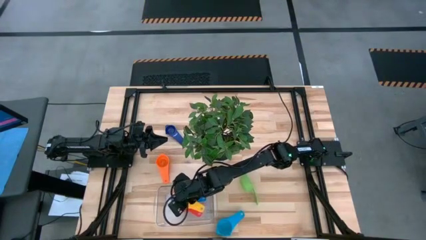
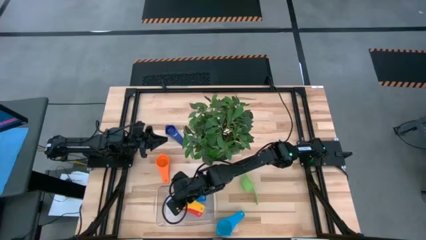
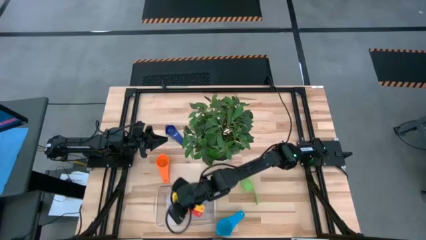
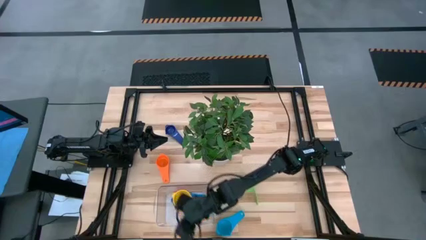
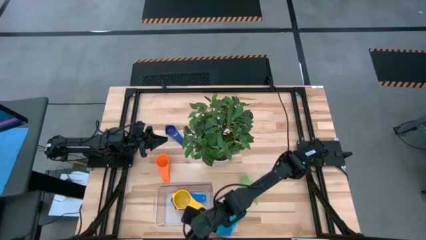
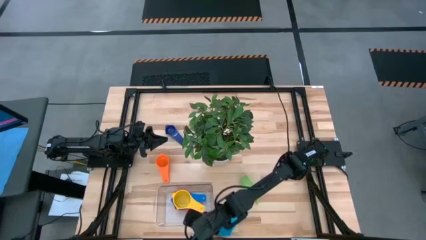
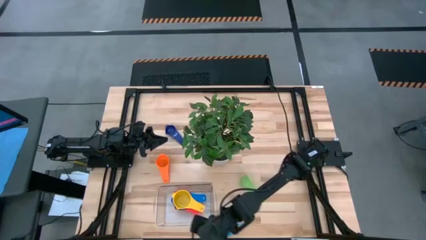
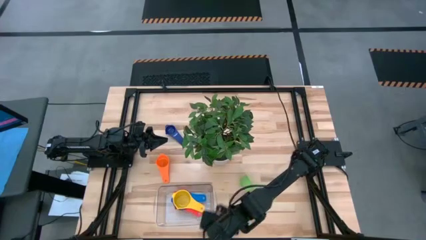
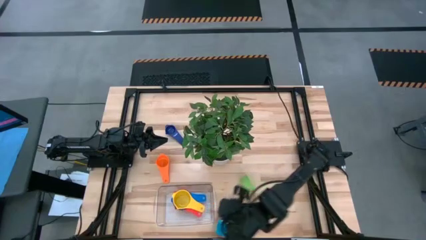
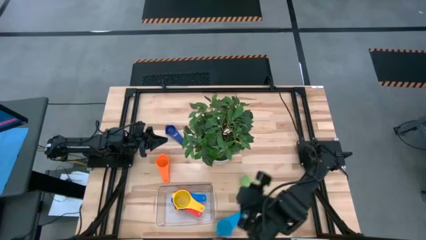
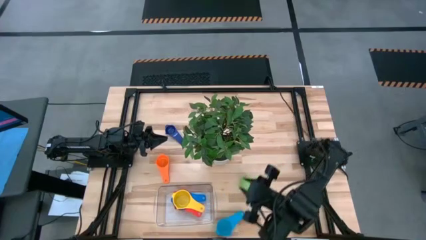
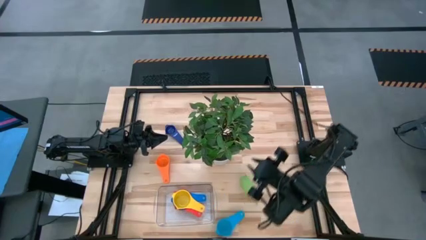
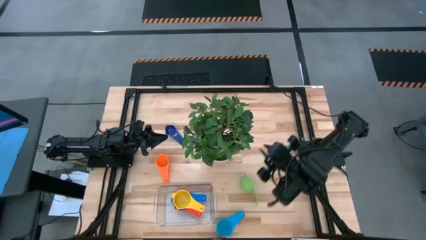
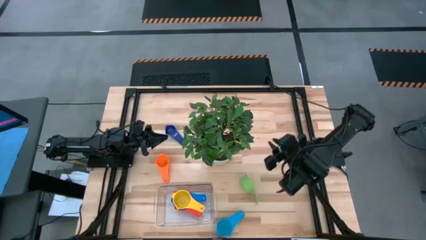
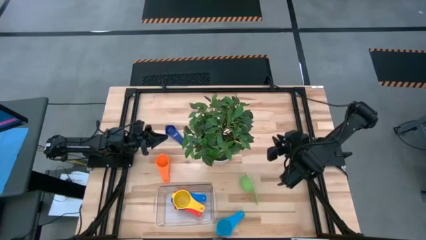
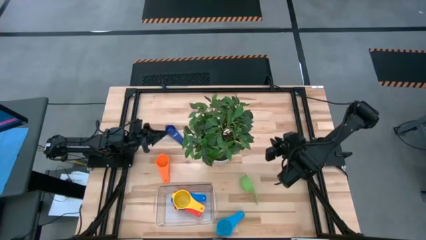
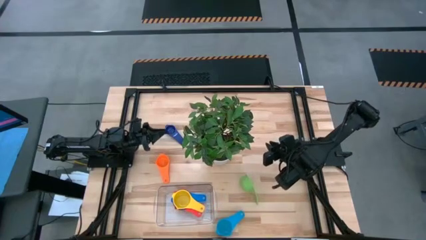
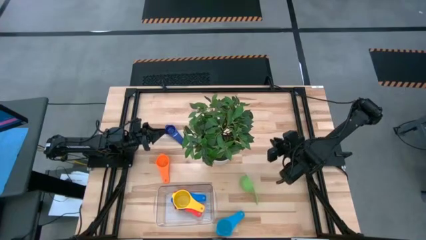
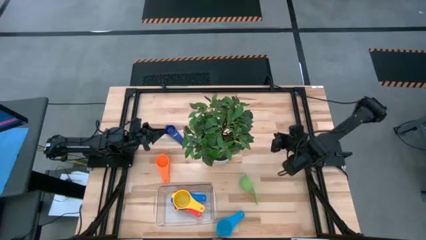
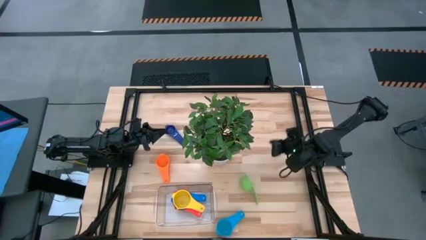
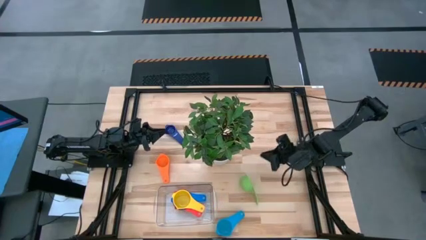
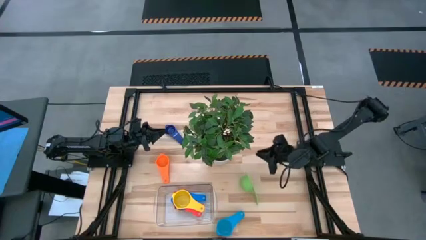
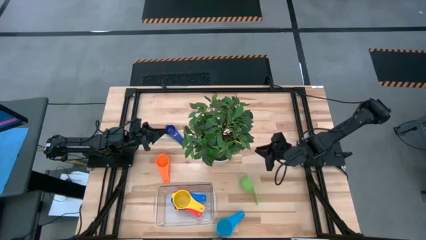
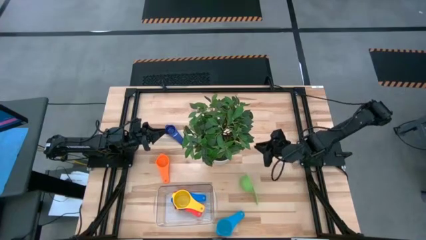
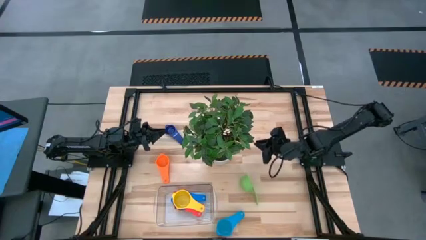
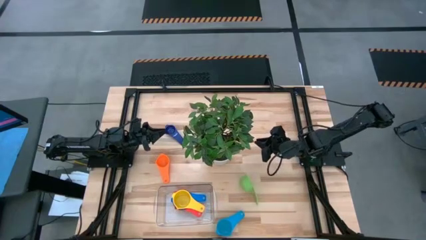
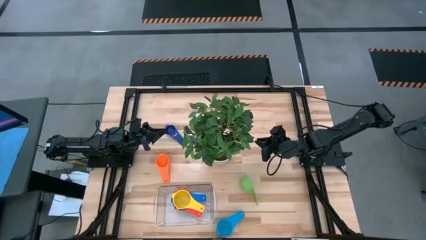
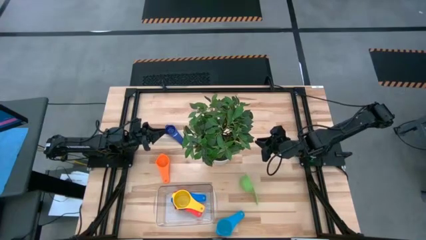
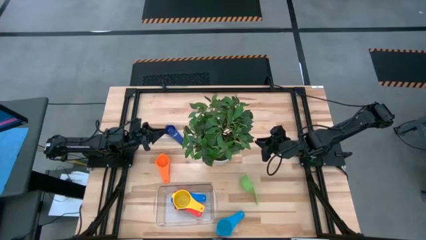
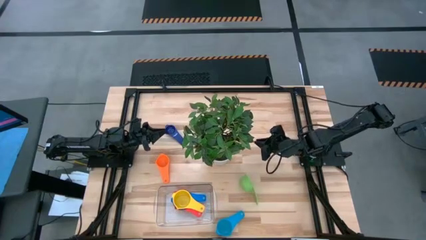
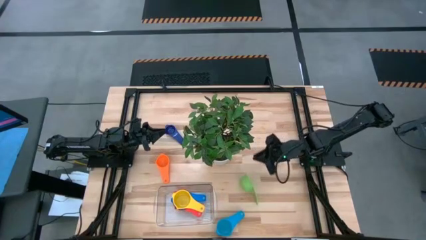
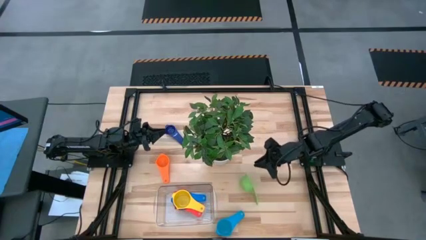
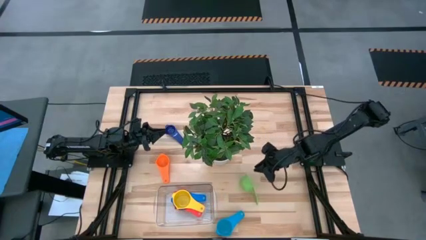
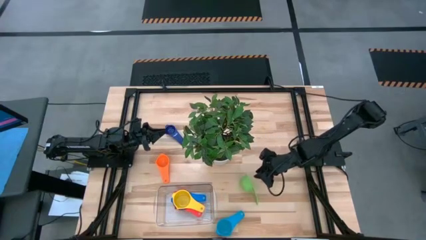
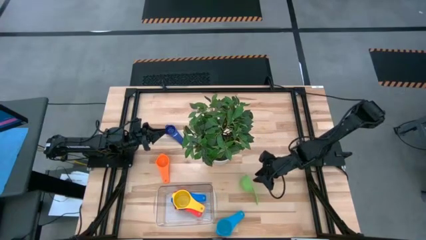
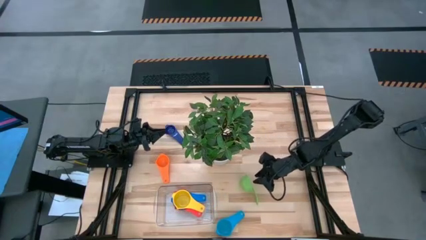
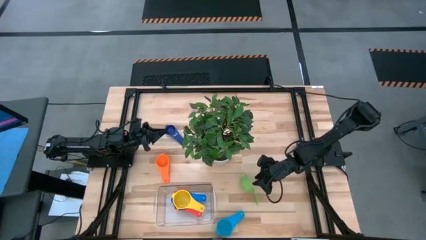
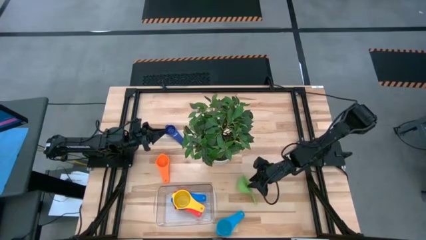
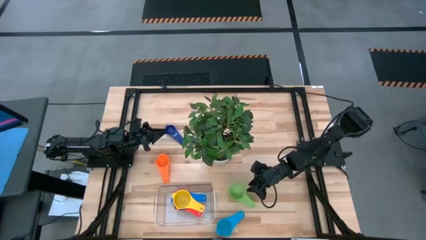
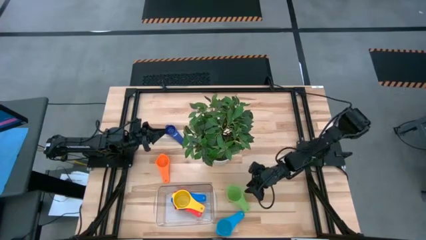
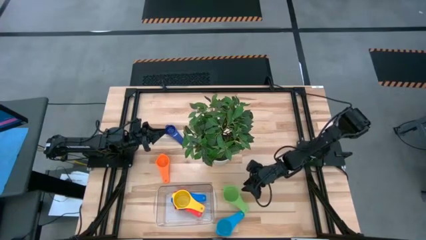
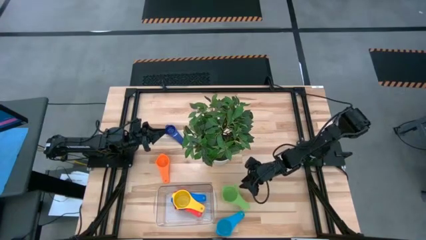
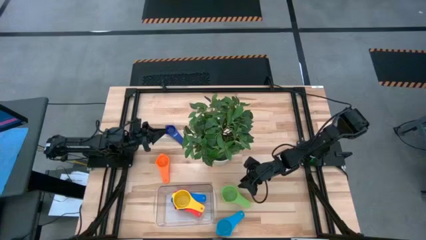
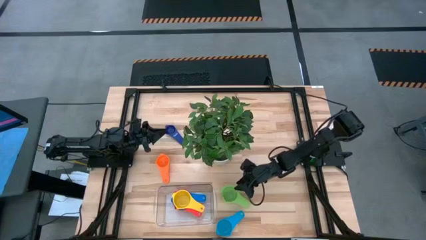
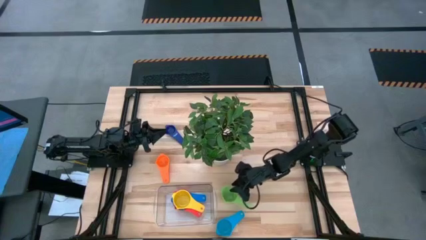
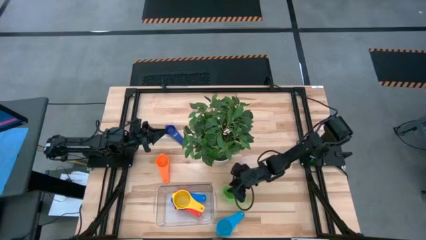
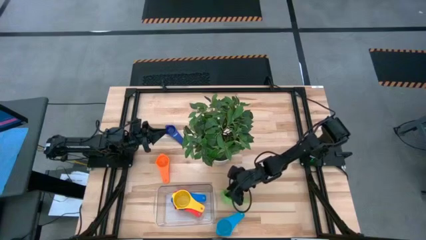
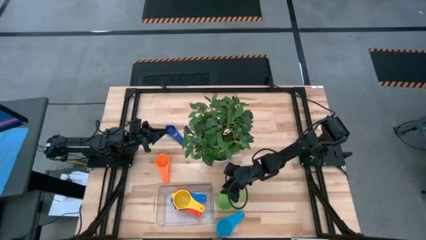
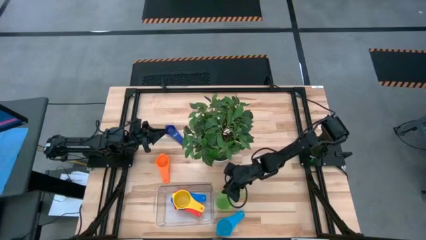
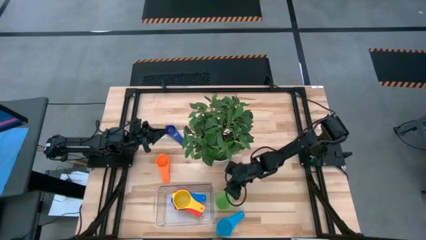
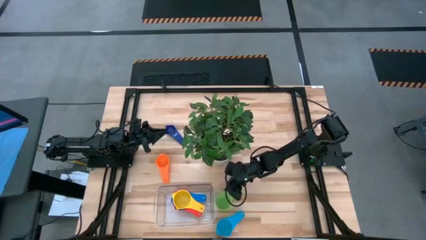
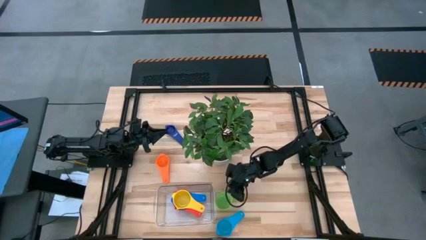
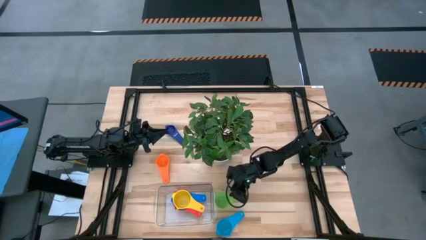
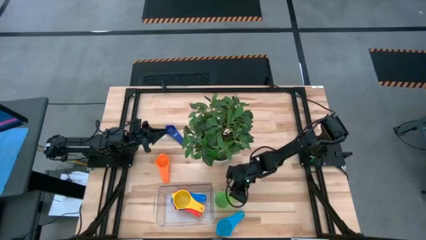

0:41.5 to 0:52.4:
Task: Nest measuring cups in basket
Stack the green measuring cup on the yellow measuring cup
